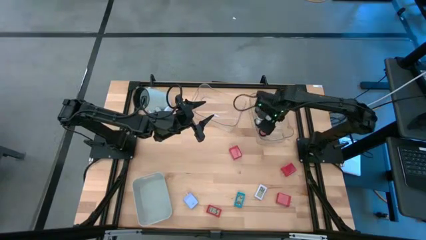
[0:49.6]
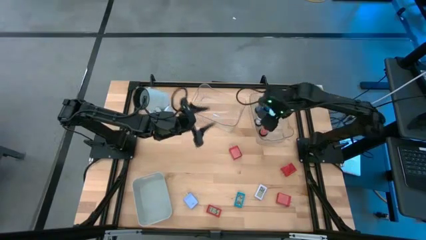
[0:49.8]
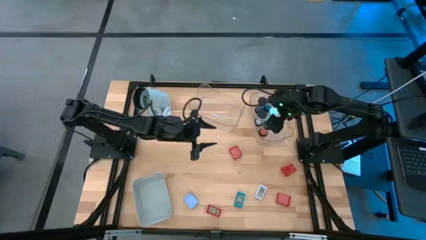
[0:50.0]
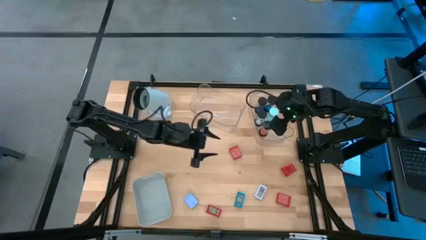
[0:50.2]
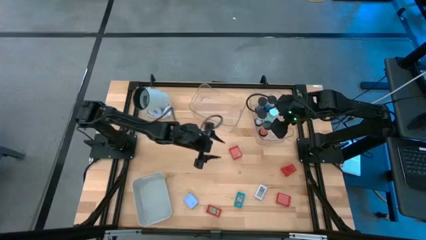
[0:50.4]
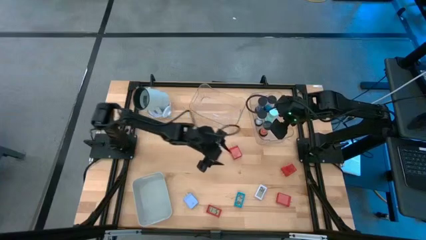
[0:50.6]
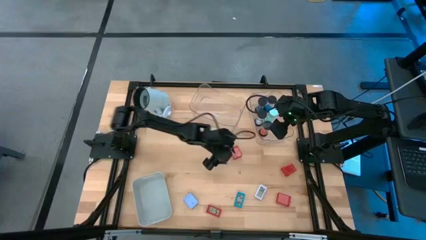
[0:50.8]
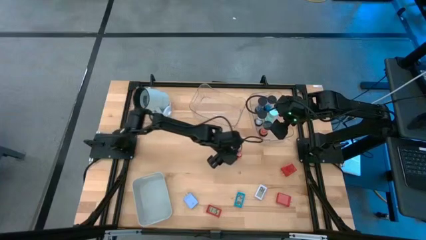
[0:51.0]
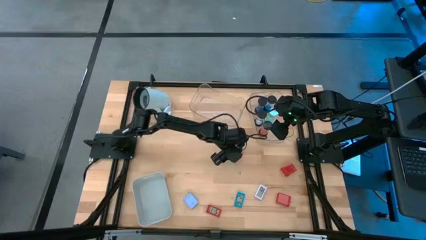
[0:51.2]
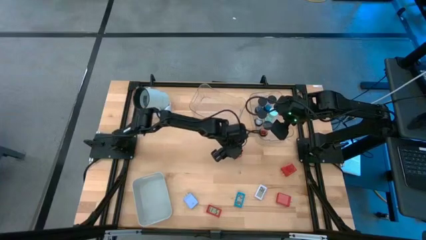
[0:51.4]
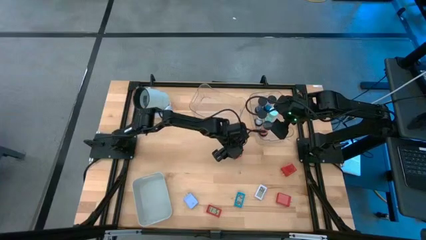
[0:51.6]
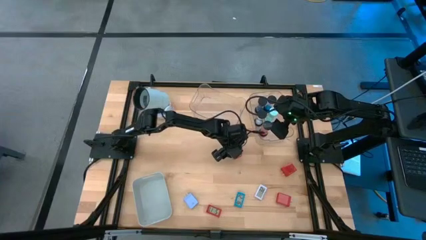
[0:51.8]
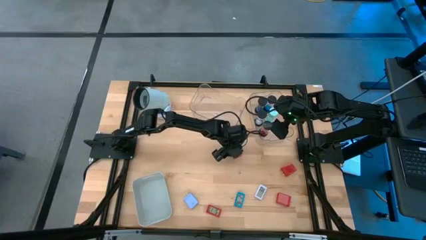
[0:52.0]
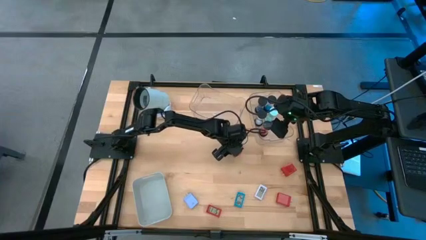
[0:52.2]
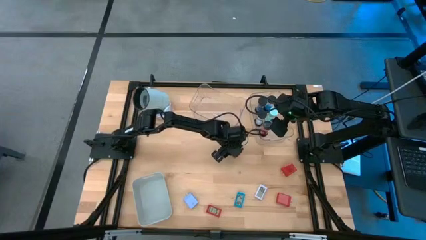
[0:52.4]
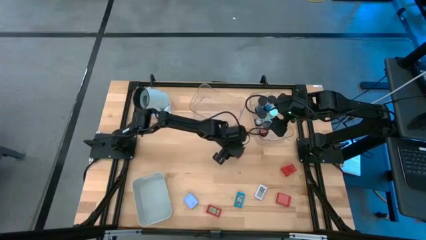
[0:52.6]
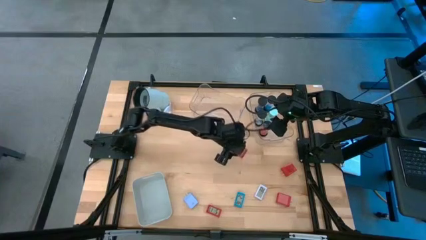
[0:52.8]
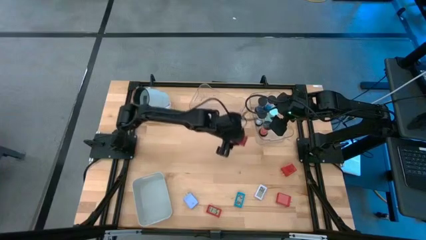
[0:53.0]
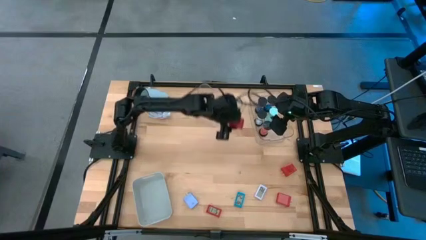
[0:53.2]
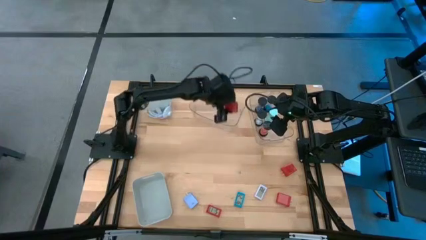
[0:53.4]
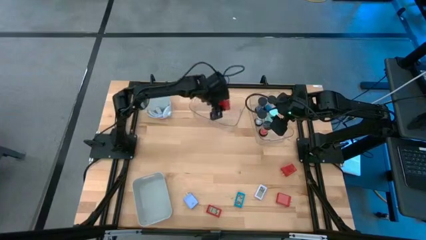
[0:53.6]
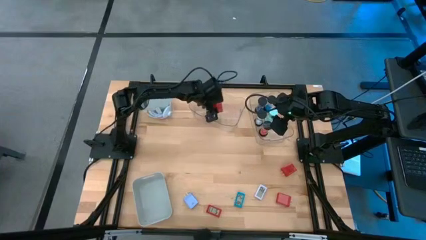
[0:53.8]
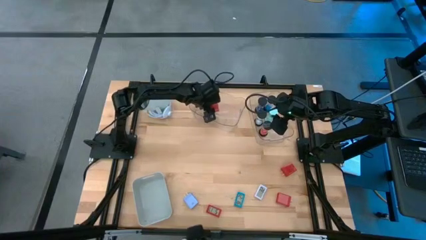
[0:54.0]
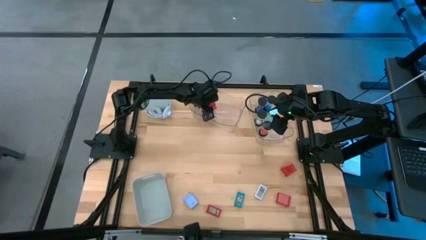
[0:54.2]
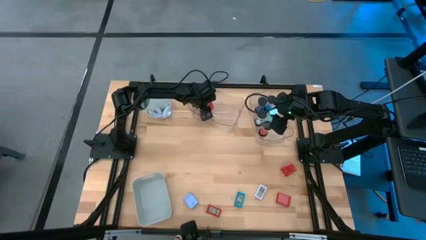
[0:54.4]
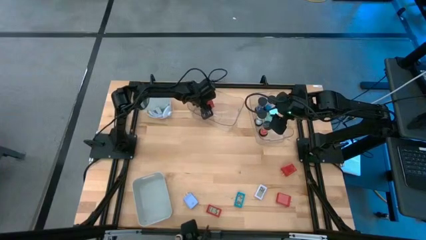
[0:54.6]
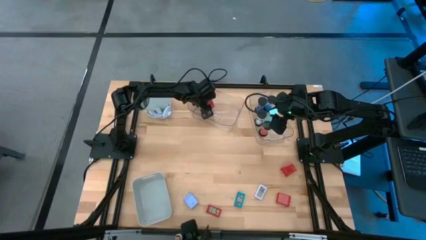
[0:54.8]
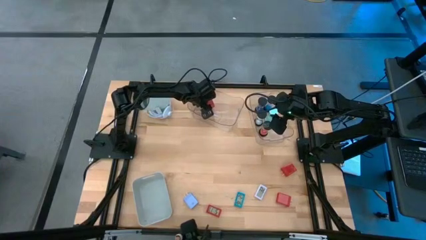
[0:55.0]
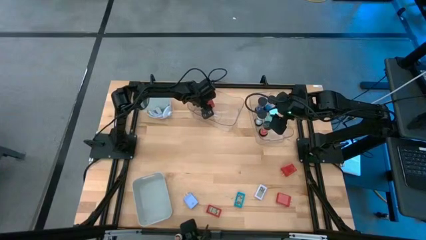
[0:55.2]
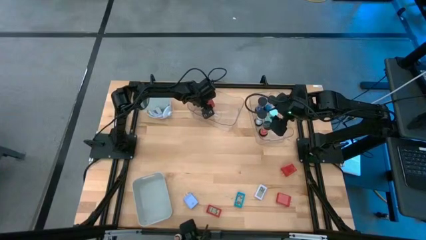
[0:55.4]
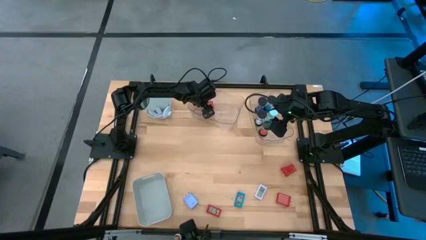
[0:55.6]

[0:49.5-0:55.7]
Task: Pick & Place Office items
Put the top red charger adapter into the left transparent bin

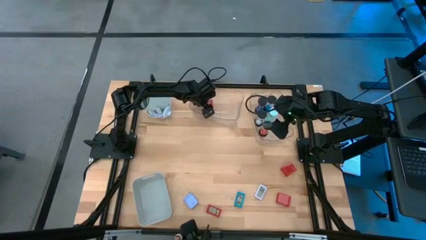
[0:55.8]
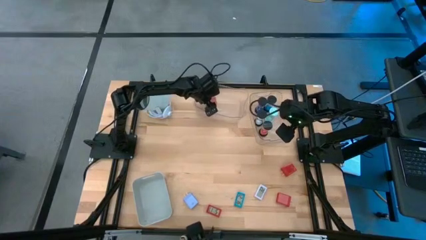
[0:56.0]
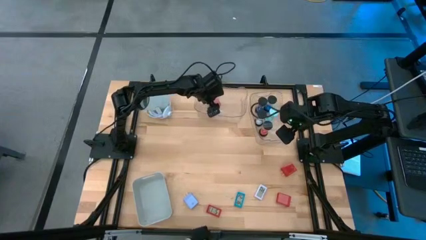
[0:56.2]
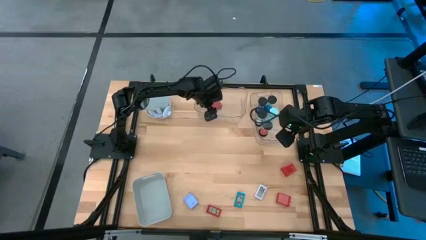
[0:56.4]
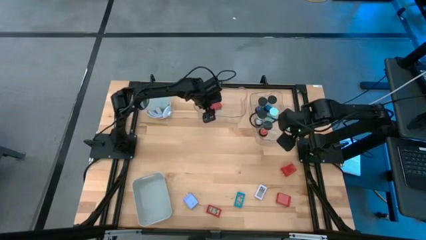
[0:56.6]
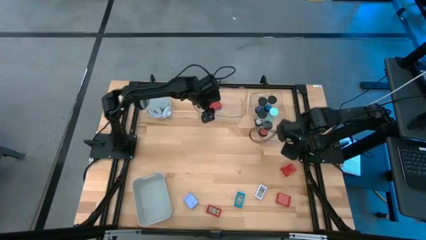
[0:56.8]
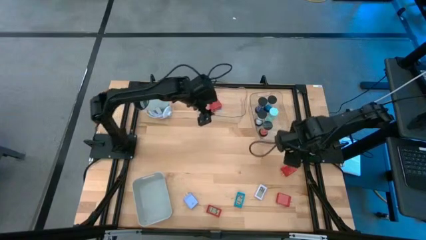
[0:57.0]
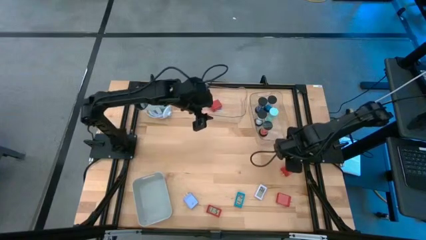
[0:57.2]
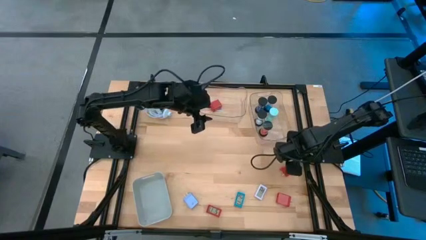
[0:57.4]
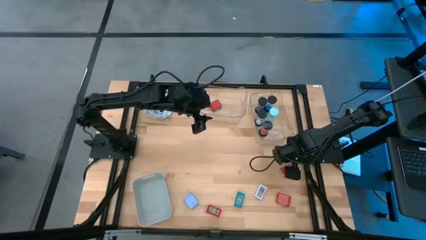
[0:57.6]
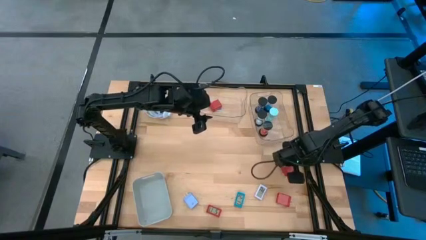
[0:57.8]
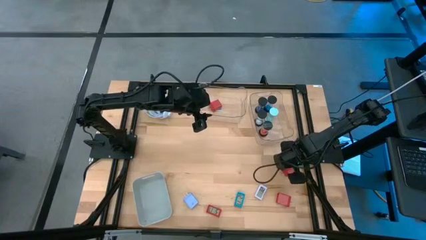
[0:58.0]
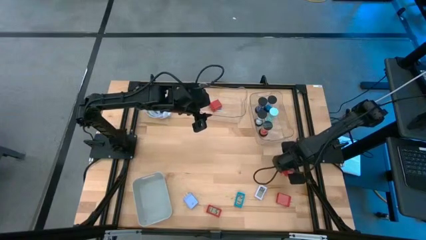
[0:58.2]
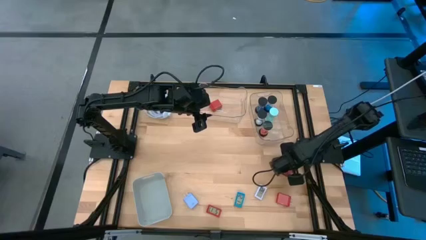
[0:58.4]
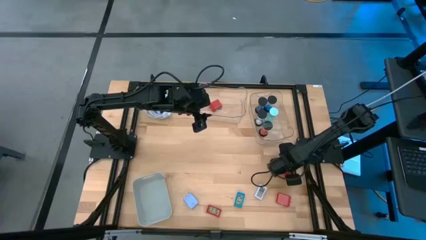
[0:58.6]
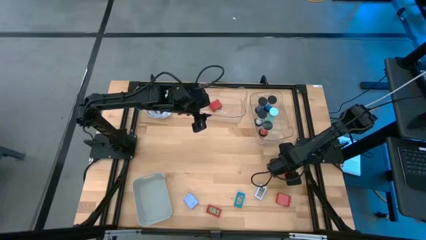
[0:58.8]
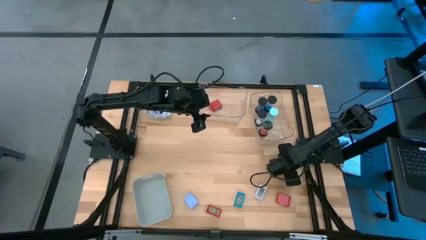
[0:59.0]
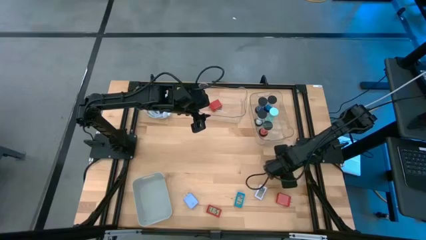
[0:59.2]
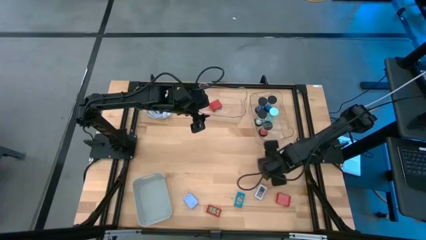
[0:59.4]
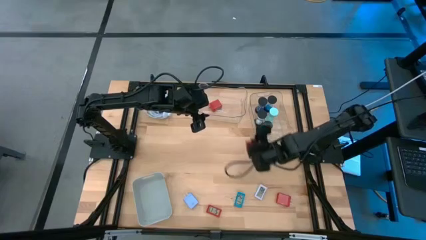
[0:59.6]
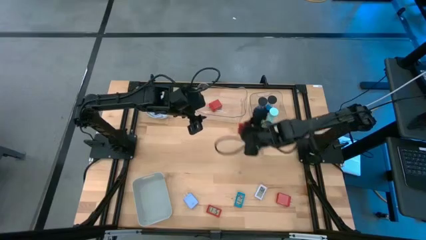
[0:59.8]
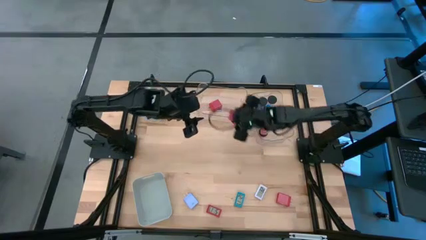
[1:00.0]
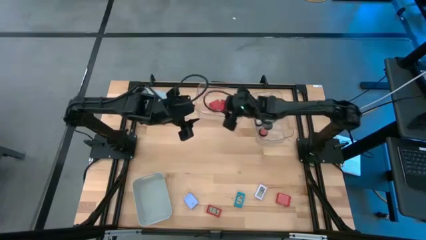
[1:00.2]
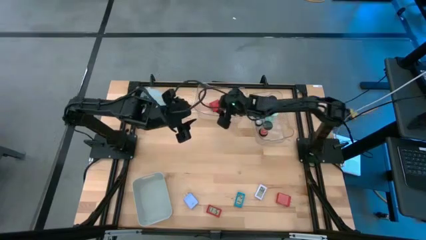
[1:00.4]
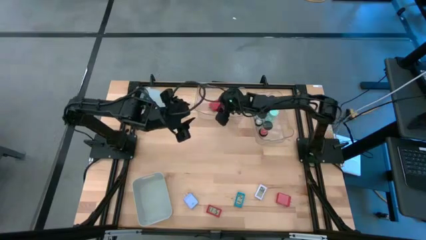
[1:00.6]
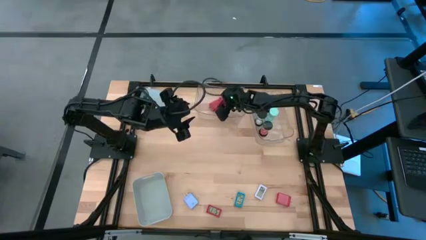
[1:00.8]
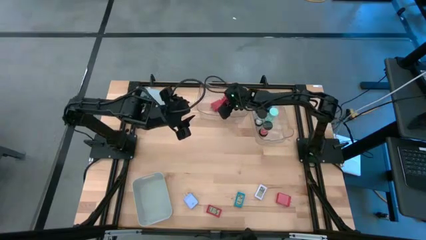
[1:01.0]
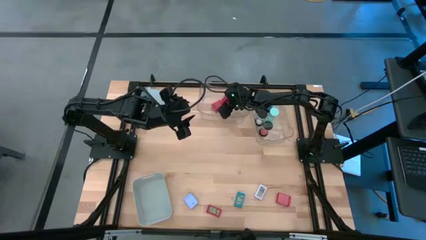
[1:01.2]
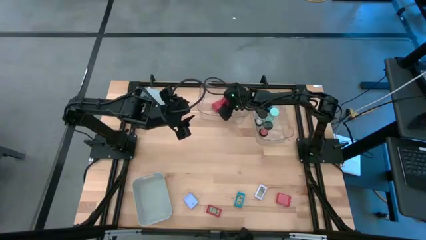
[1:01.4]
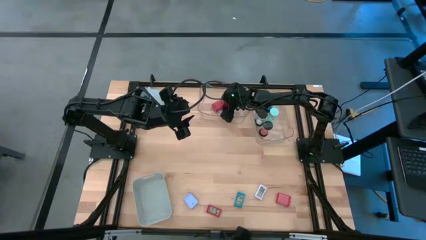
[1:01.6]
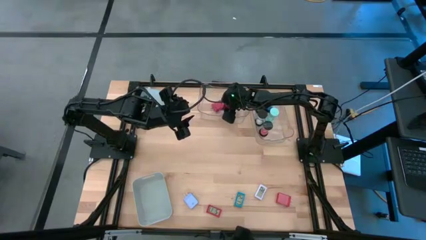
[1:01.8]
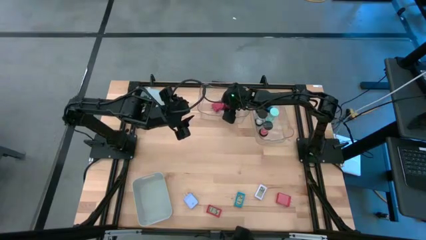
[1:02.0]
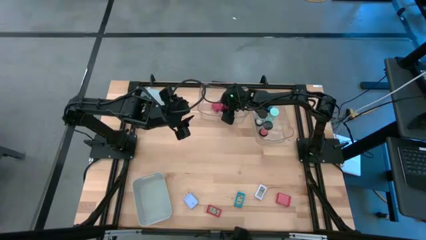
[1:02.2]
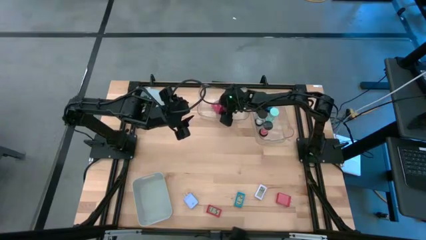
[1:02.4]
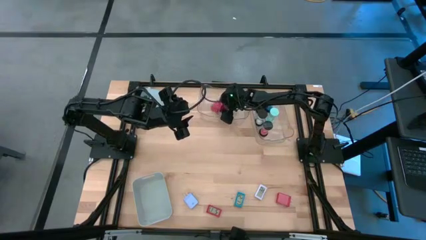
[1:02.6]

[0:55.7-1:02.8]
Put the top red charger adapter into the left transparent bin

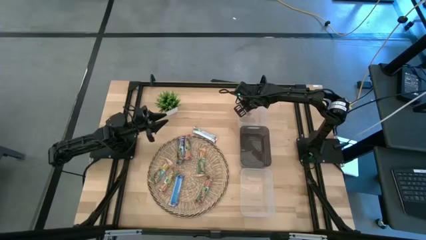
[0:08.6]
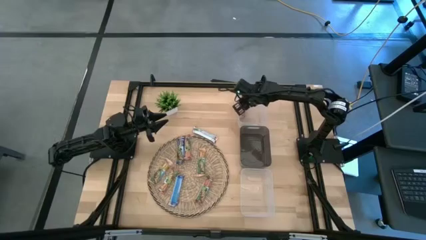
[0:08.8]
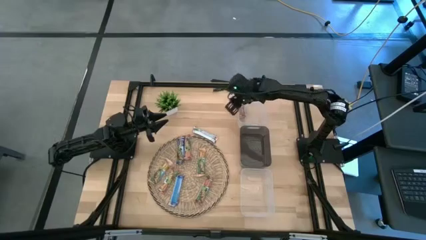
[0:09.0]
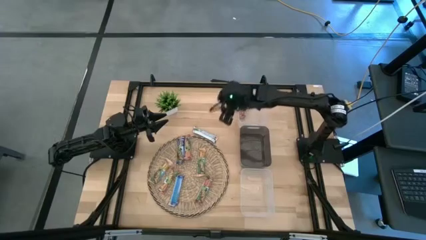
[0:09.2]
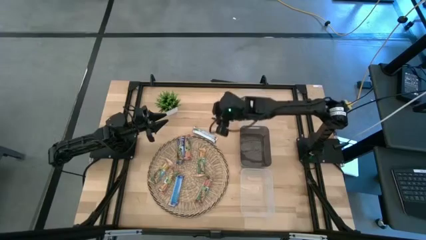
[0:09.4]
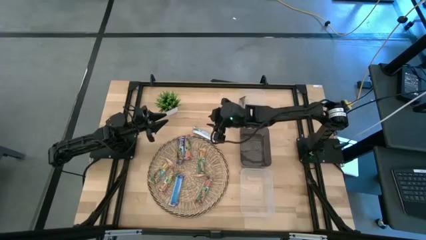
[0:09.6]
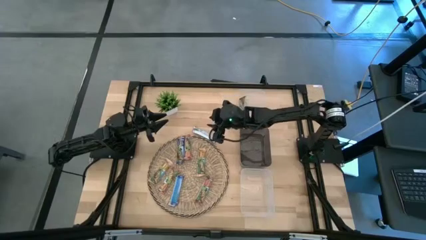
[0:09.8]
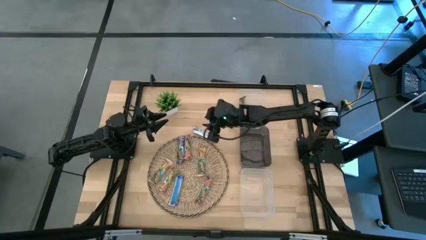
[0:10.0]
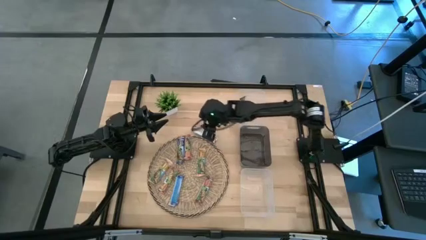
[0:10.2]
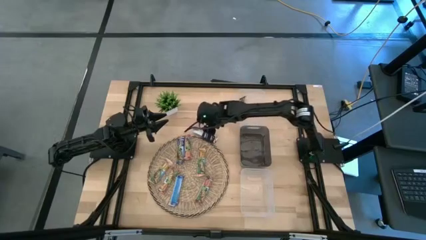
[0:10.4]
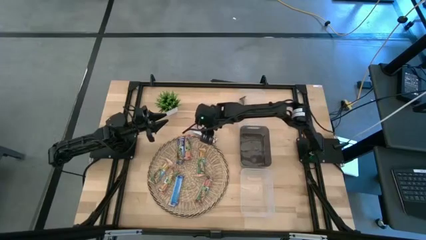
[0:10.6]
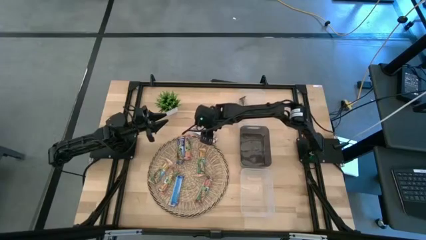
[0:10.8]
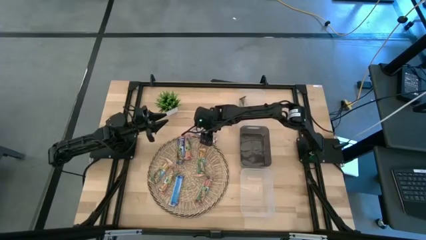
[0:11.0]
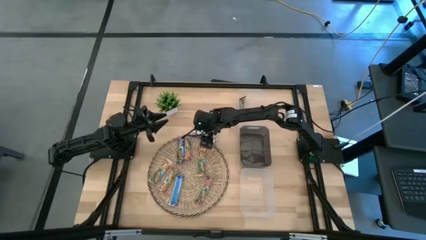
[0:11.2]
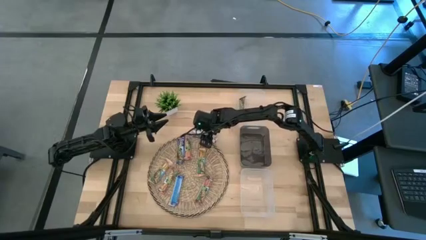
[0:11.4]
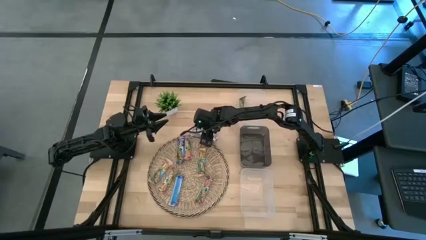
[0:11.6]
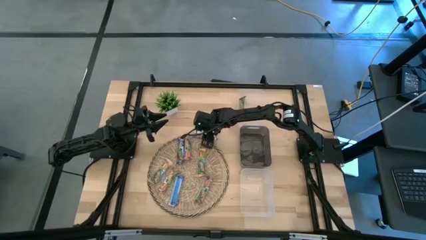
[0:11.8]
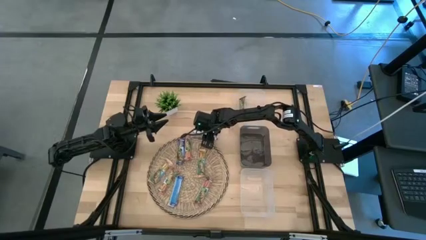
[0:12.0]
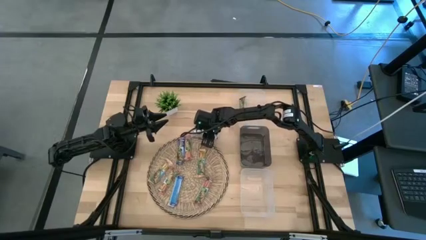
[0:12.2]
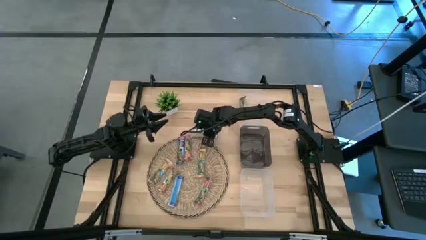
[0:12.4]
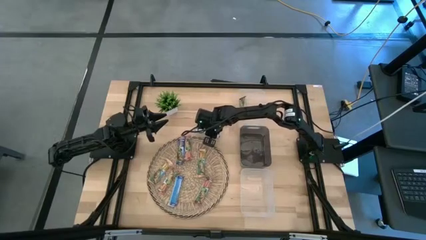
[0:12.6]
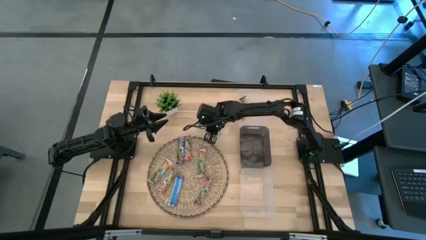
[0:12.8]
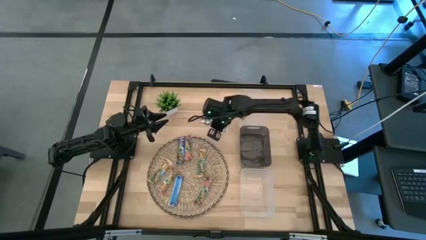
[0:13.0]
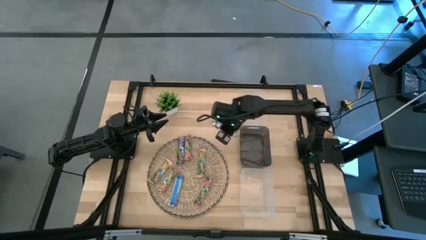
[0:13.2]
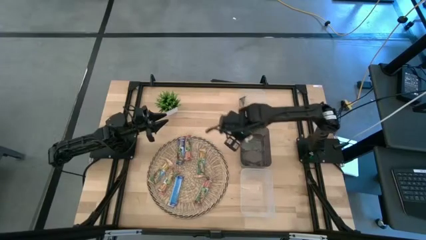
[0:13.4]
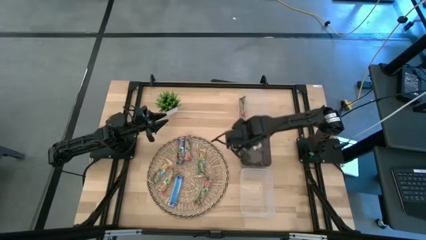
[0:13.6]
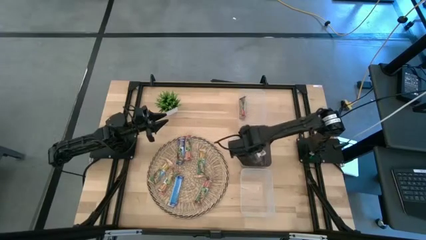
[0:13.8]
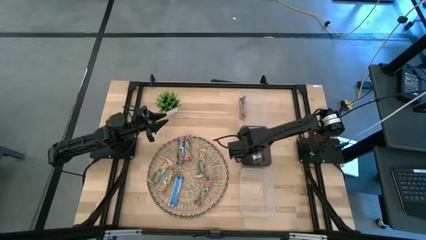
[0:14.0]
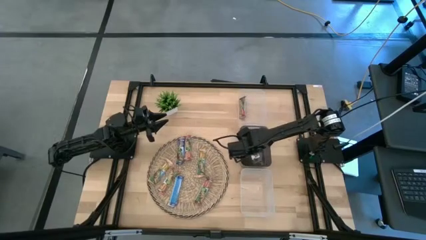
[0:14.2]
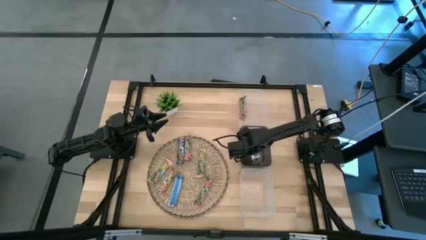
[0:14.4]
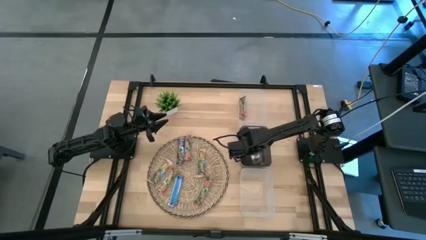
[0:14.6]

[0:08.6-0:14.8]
Task: Pick and place Granola Bars by type
Put the yellow granola bar into the black bin
